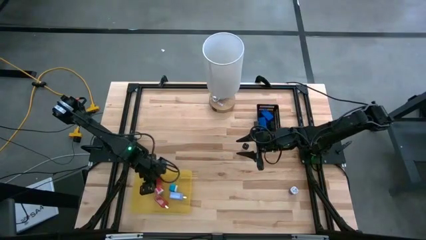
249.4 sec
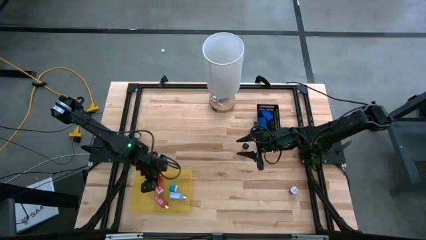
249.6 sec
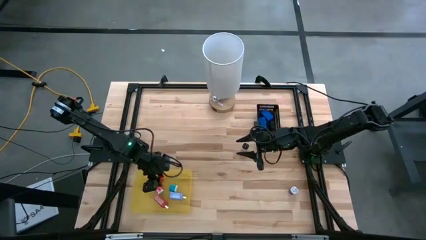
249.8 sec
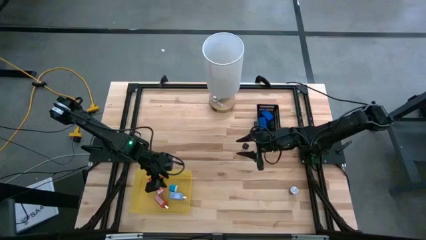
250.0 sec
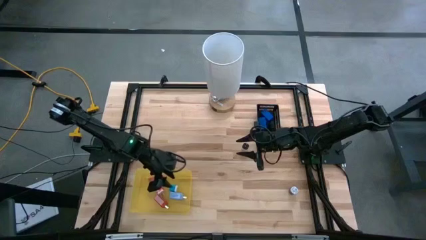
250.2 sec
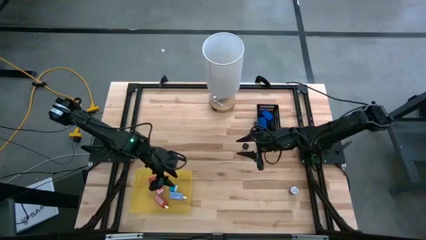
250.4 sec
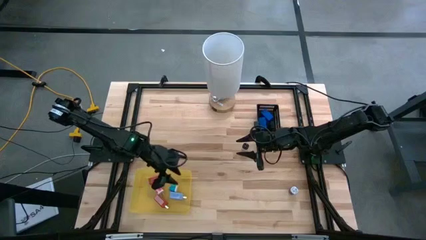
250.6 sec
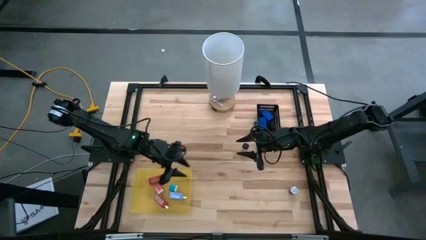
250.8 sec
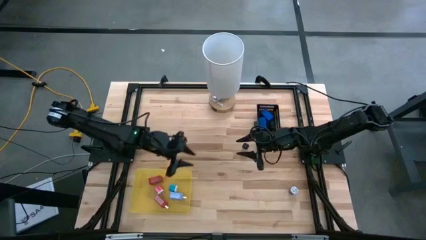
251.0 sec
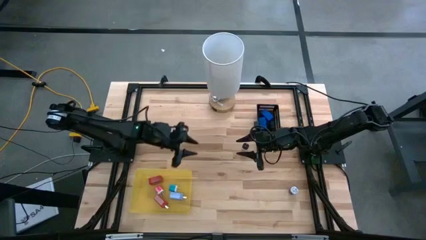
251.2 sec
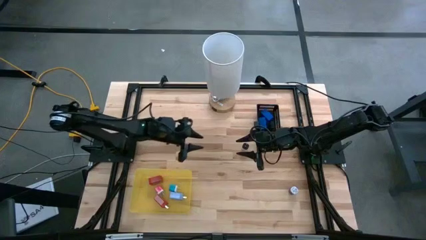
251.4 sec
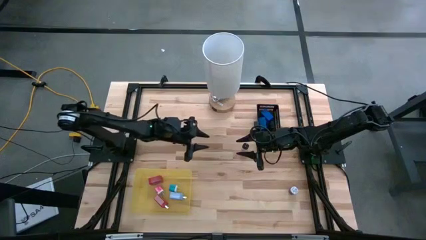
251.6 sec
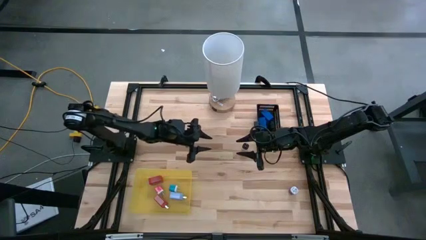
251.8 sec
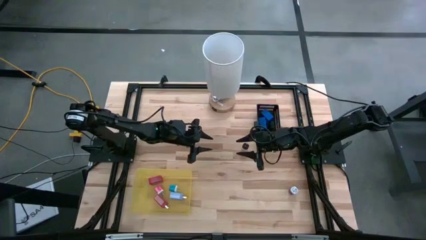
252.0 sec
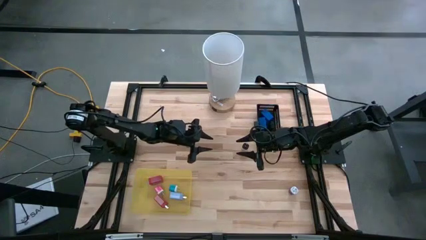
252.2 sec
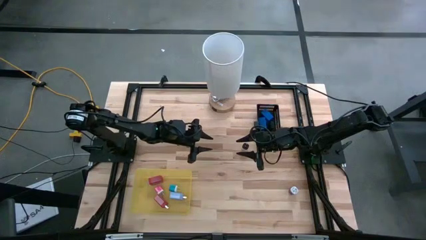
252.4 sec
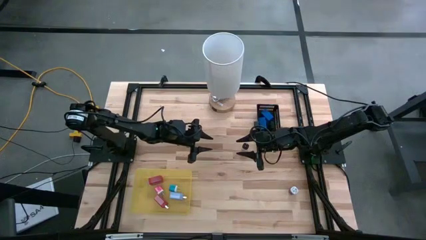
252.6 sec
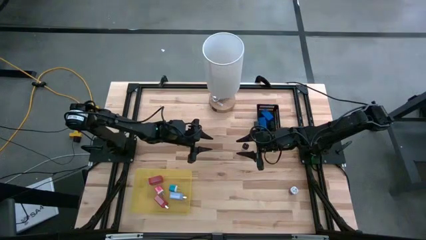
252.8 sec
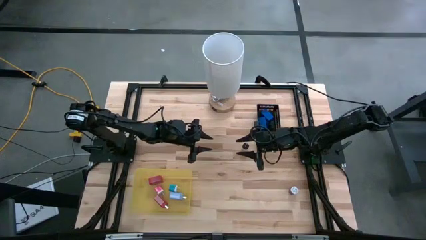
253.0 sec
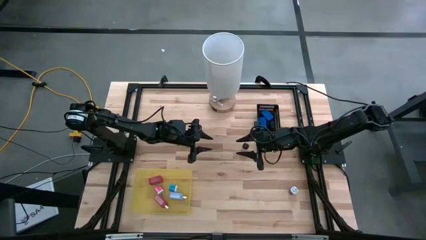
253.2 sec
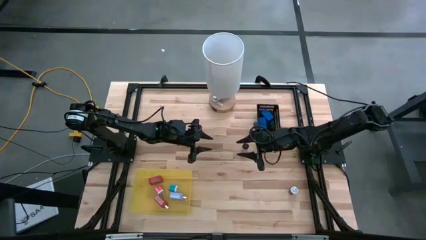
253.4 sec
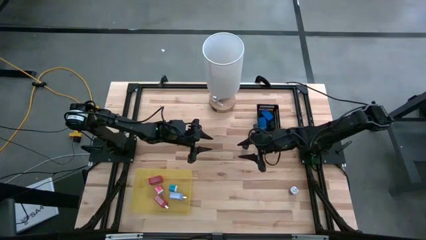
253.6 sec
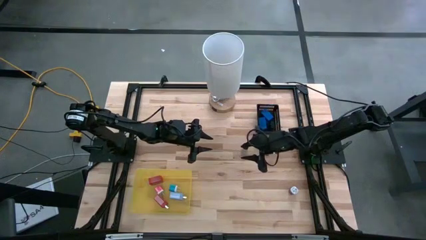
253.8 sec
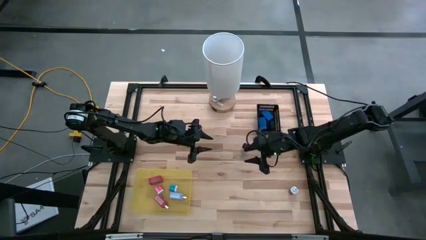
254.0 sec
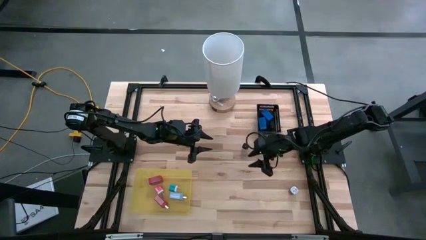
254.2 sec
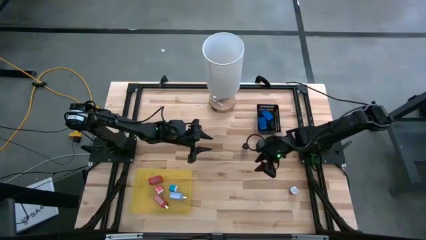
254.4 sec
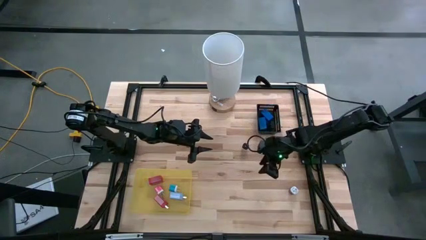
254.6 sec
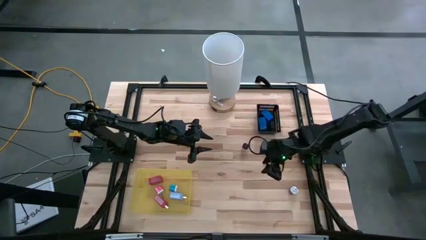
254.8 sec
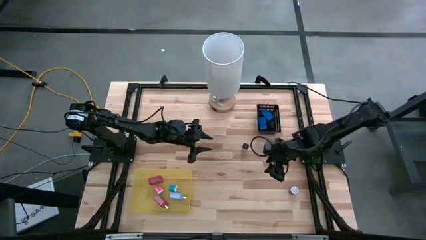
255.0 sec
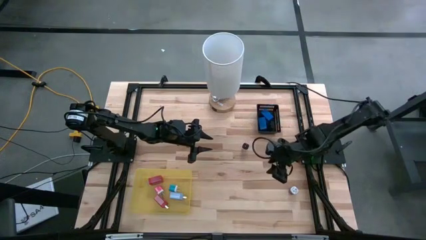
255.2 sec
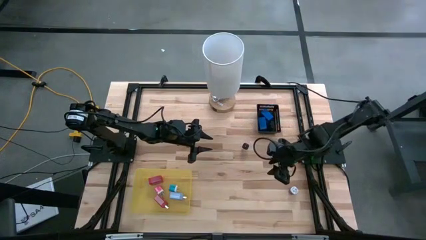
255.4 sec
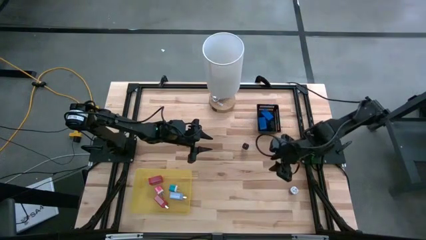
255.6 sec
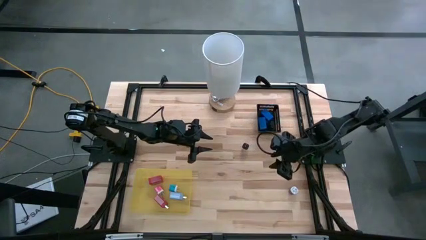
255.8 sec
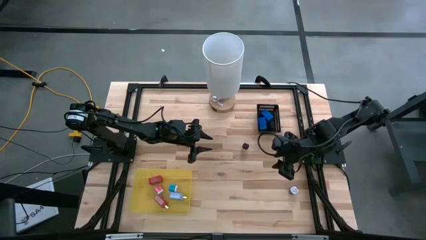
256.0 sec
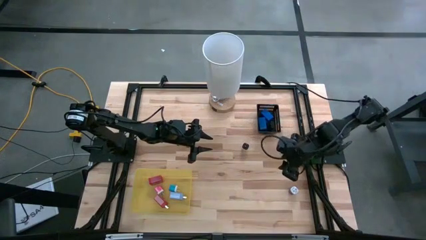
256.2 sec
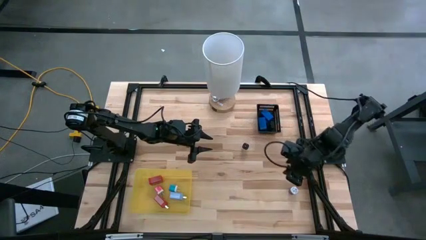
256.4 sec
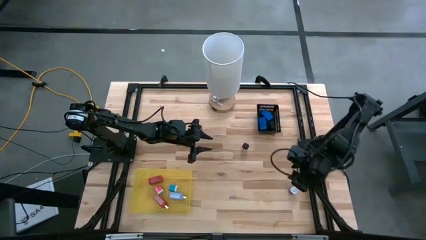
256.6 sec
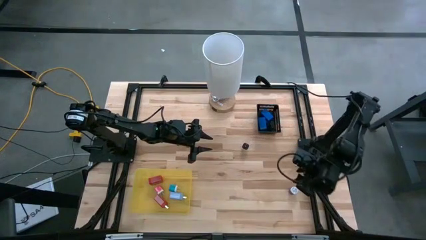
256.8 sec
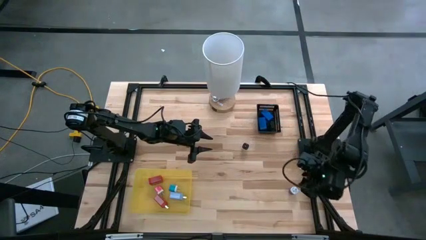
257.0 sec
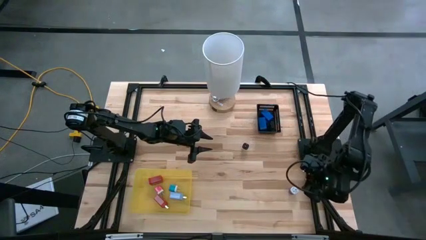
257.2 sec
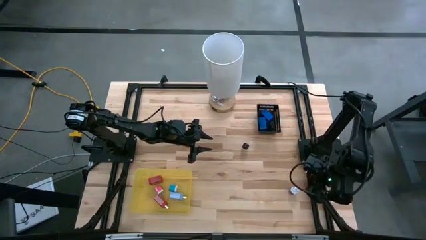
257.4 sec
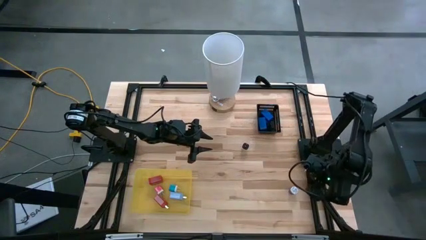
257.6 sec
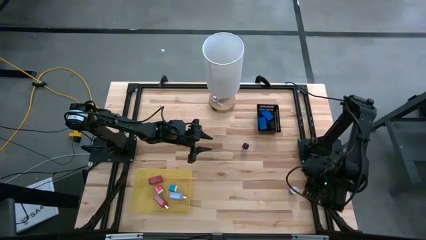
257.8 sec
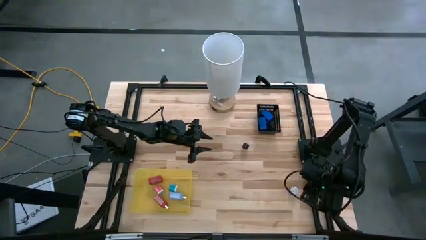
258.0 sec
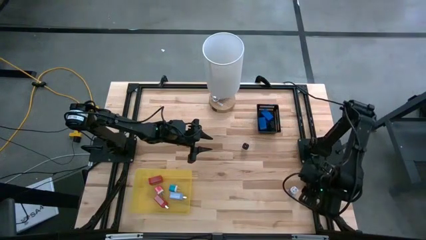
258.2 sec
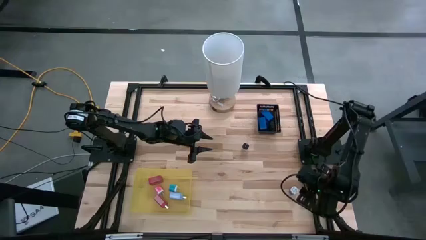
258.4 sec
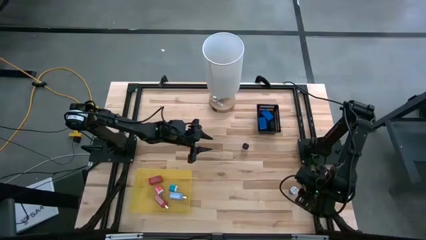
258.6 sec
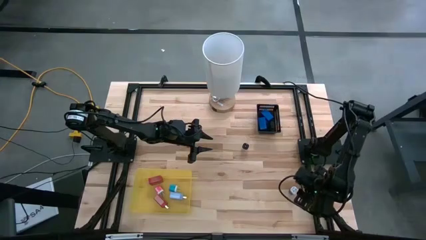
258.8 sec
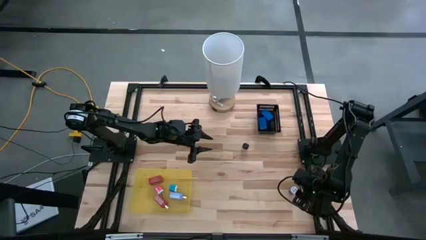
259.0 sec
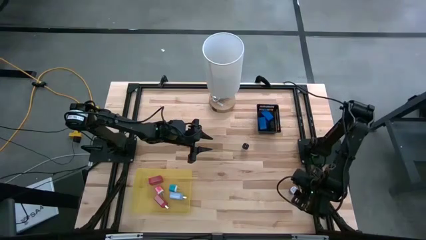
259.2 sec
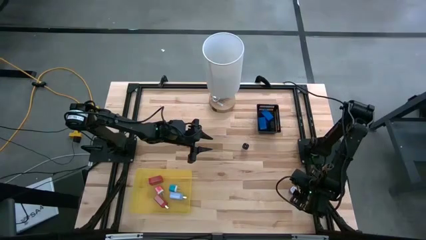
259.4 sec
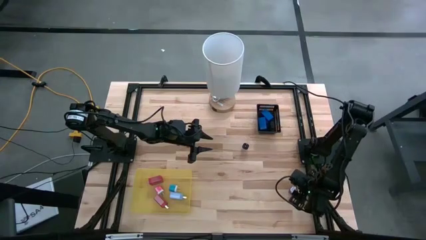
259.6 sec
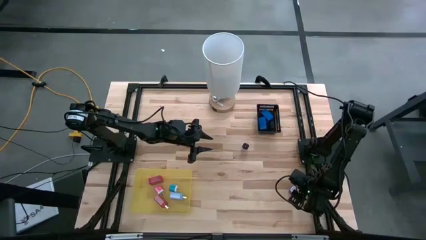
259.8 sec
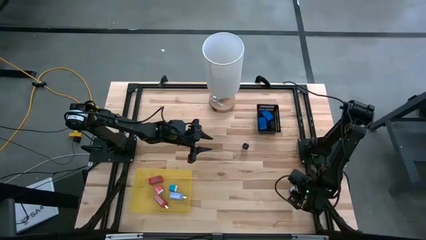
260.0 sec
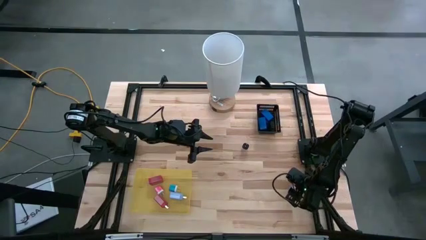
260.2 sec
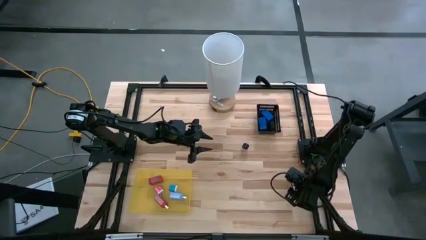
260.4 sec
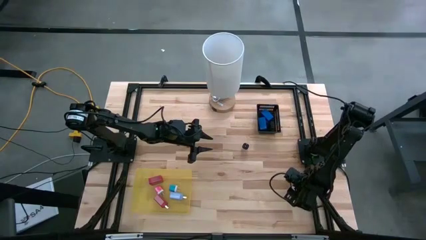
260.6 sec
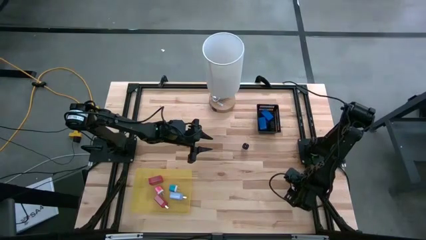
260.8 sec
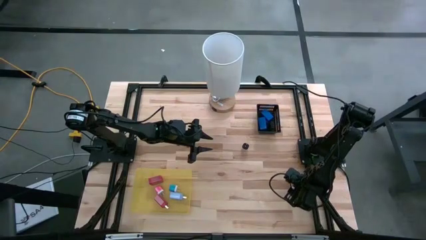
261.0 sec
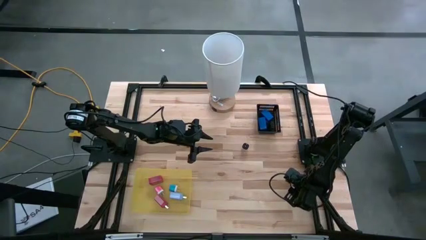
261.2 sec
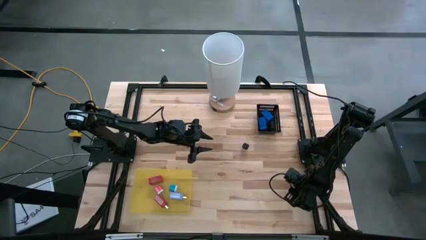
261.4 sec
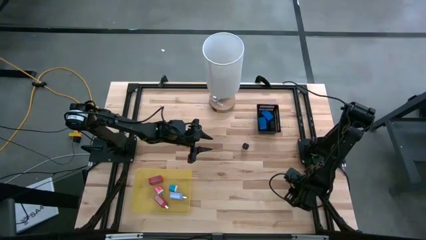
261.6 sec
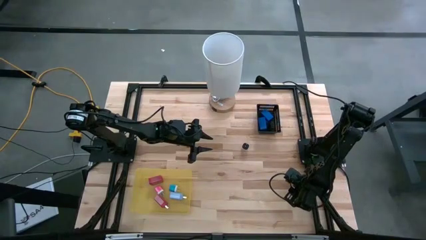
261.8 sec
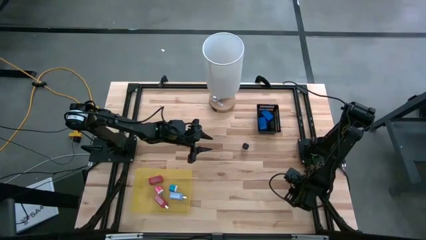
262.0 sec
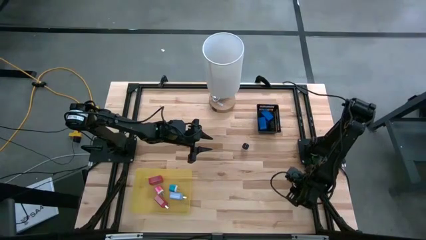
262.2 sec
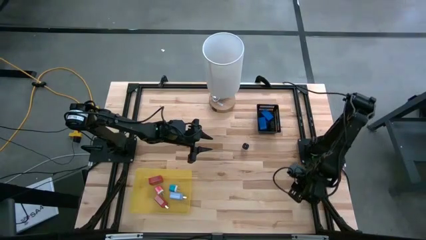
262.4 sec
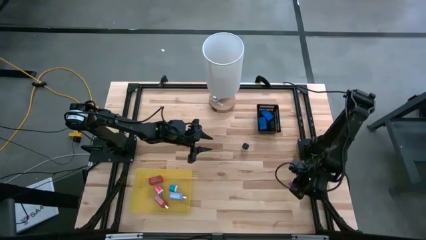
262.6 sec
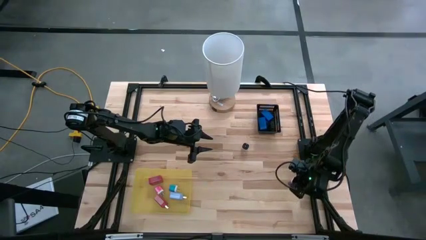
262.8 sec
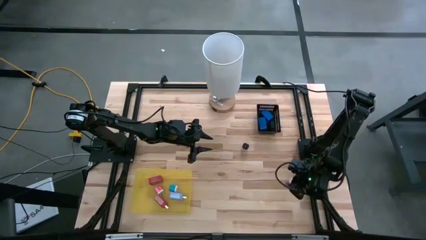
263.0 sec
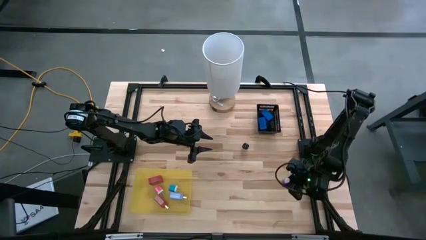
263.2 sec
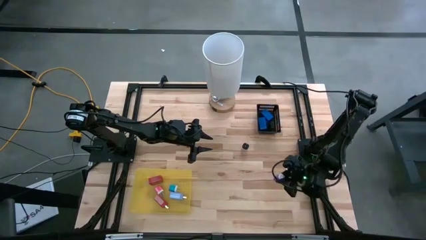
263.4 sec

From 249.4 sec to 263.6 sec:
Task: Pick & Place Office items
Put the violet charger adapter into the yellow bin
